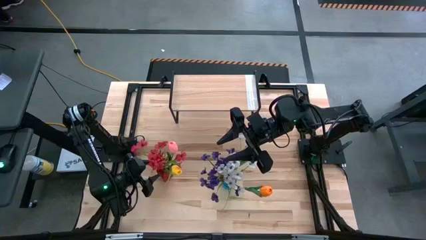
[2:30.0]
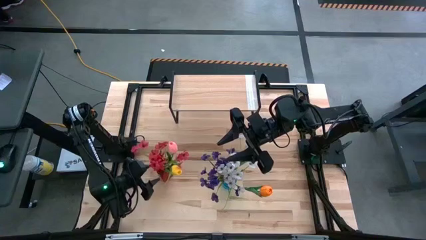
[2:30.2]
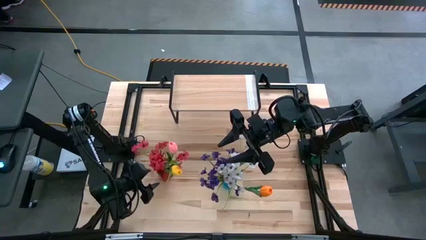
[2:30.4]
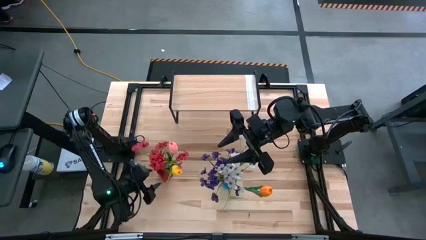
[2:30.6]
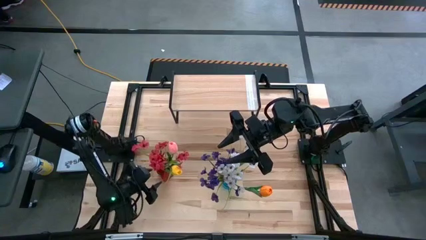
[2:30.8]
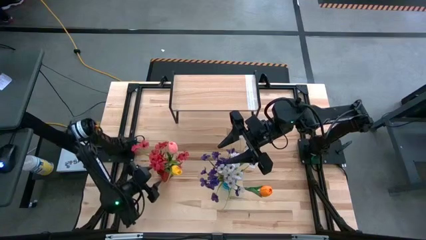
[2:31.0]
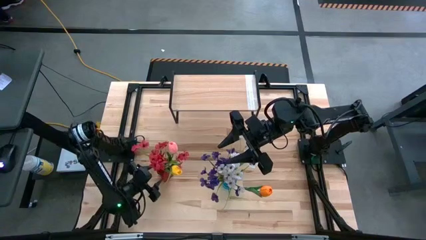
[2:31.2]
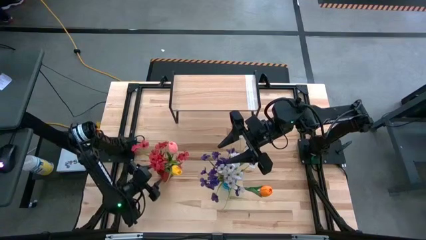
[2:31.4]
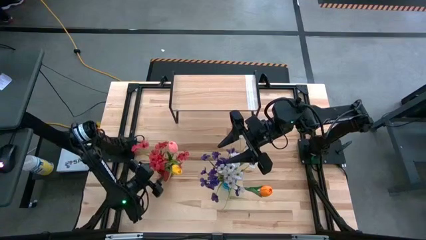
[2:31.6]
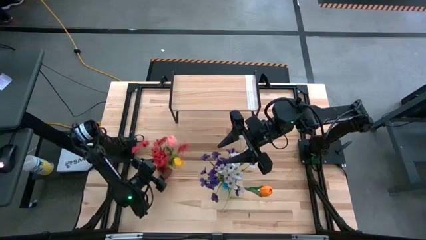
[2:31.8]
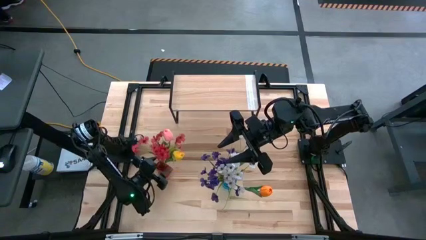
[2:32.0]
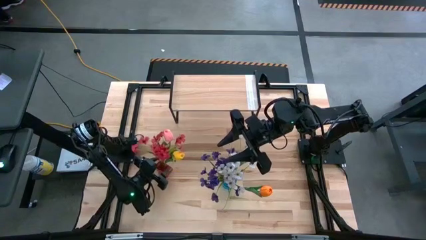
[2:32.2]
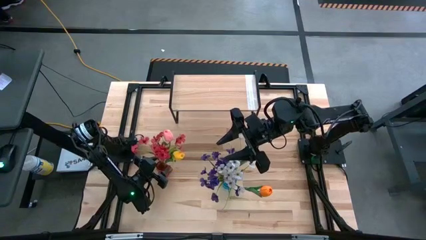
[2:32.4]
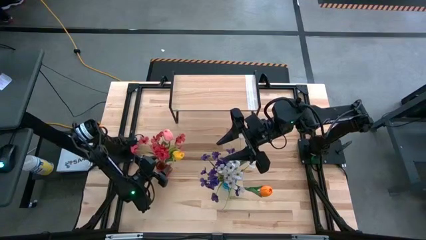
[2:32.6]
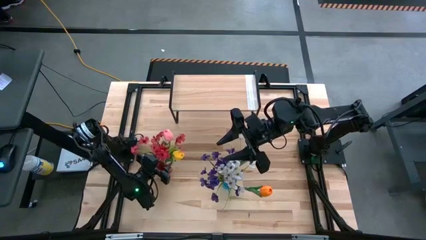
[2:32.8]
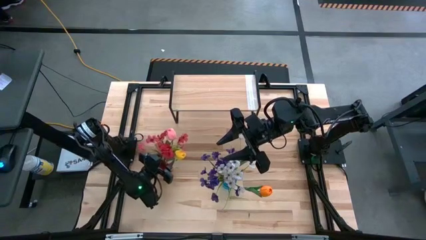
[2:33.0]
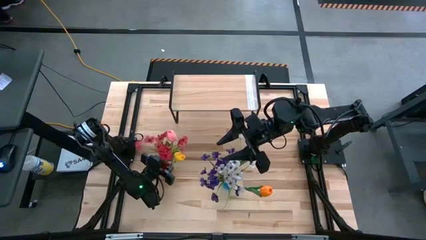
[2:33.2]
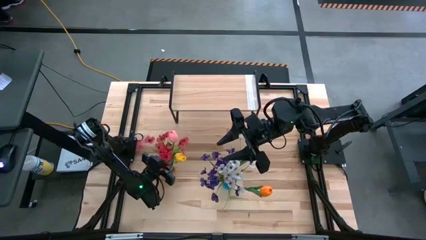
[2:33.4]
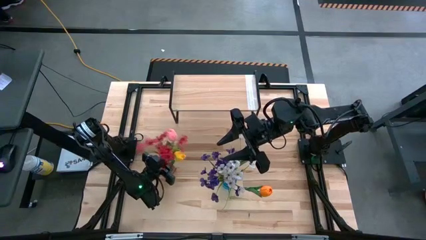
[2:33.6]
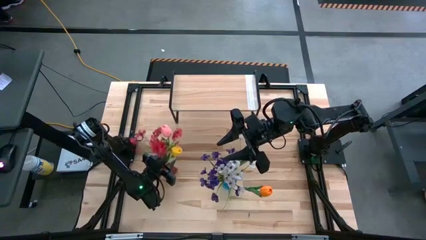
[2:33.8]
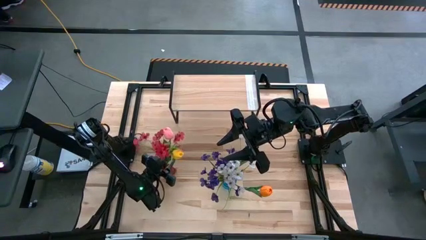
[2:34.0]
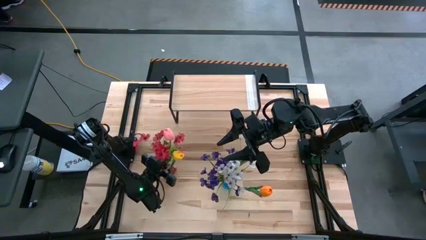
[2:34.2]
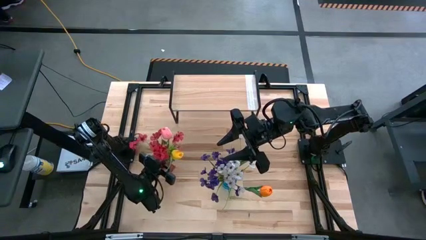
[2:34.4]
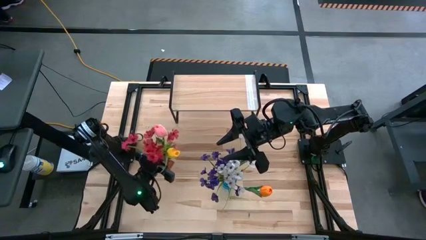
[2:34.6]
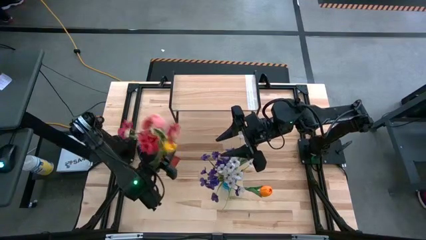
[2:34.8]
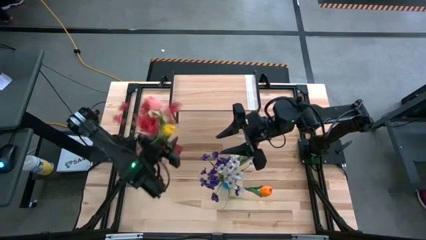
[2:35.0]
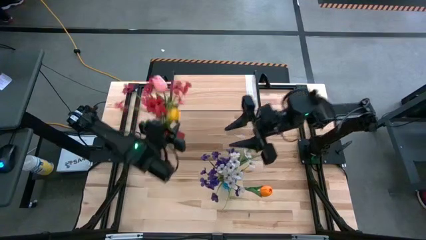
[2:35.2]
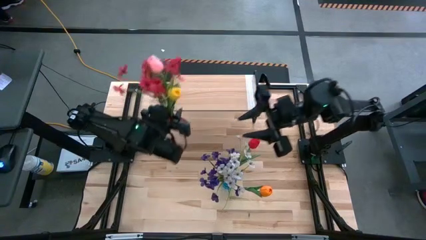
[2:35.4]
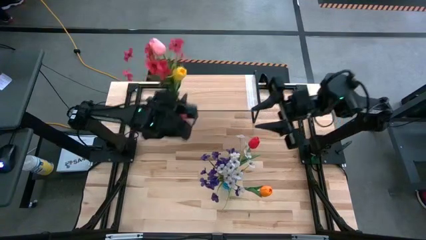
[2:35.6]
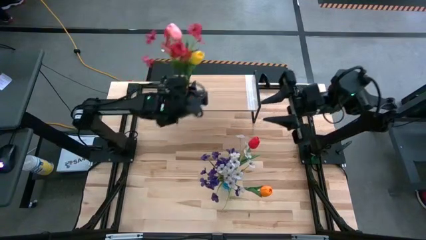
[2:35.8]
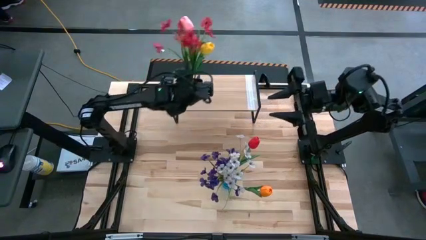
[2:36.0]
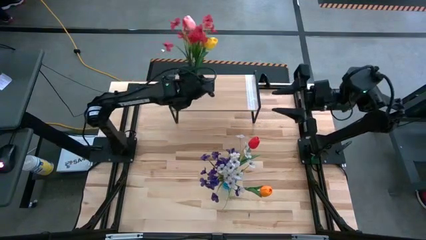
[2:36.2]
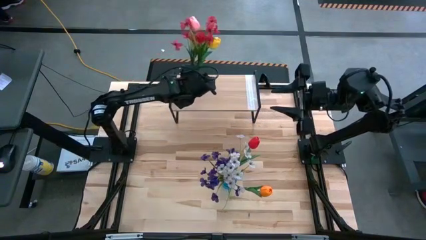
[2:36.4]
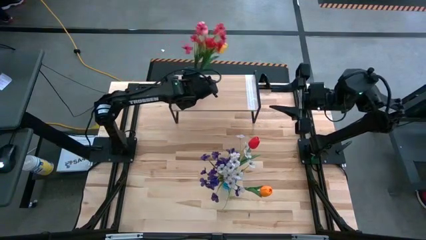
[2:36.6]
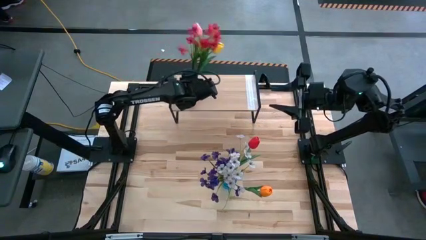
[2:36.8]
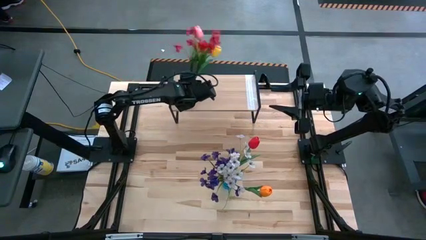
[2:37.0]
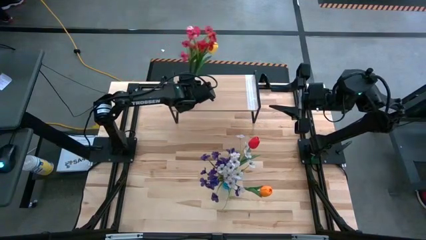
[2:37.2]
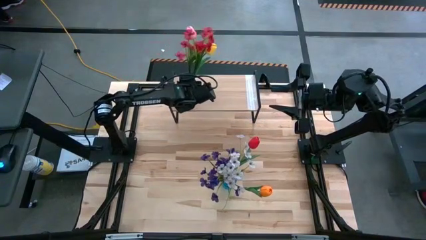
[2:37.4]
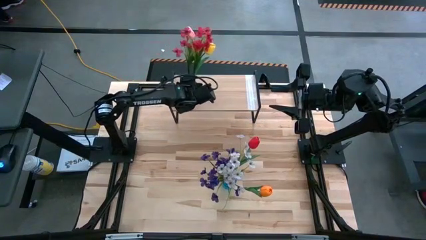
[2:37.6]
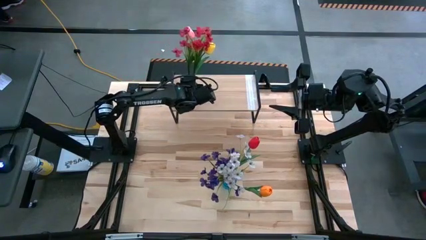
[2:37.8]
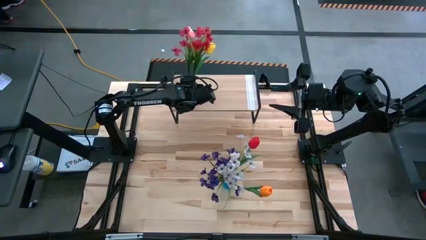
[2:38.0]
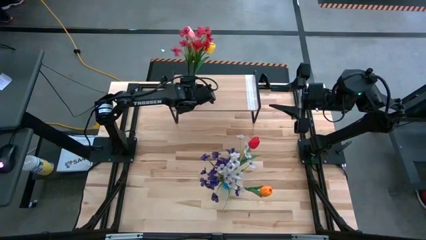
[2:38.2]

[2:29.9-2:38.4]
Task: Pick and place flowers into a vace then onto a shelf
Put the red vase on the shelf

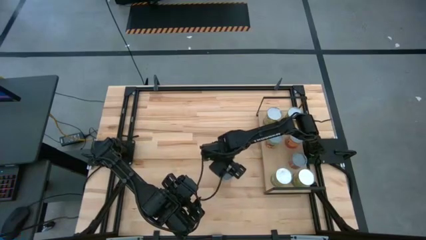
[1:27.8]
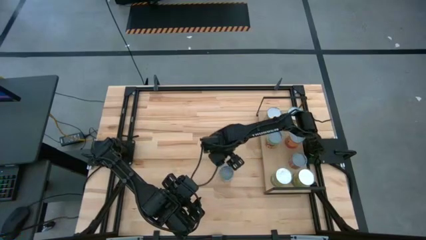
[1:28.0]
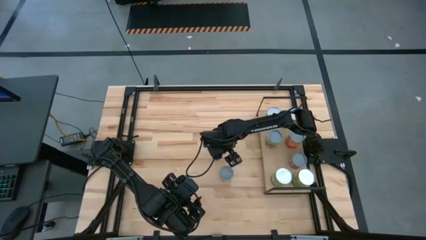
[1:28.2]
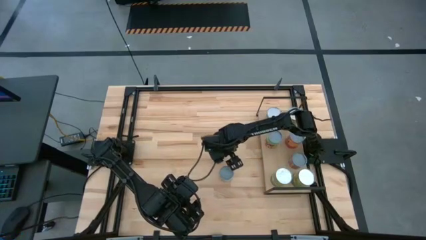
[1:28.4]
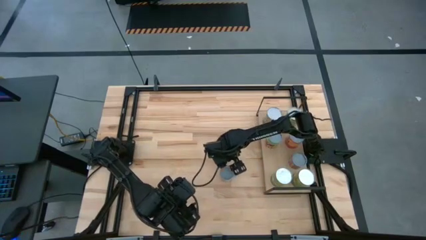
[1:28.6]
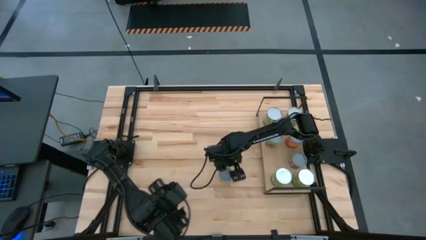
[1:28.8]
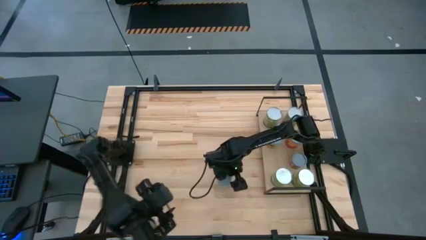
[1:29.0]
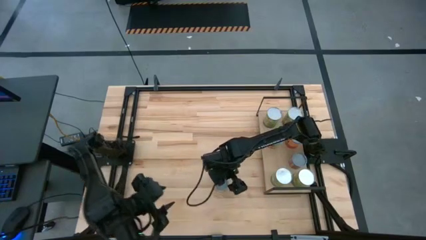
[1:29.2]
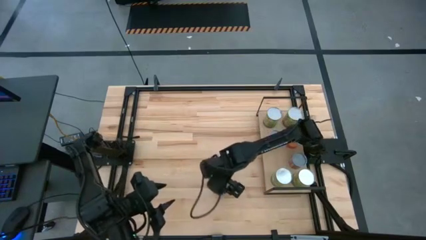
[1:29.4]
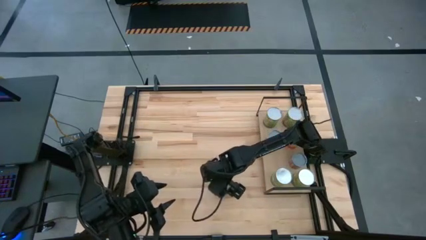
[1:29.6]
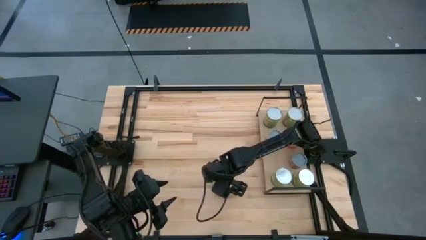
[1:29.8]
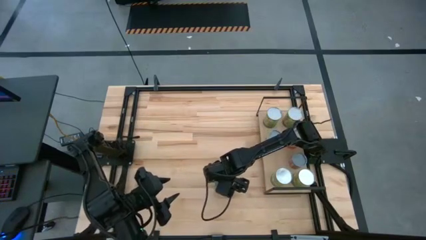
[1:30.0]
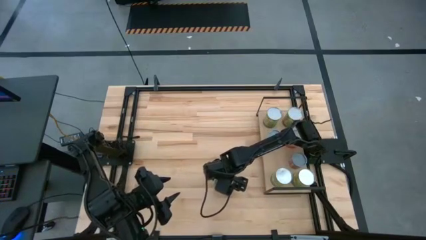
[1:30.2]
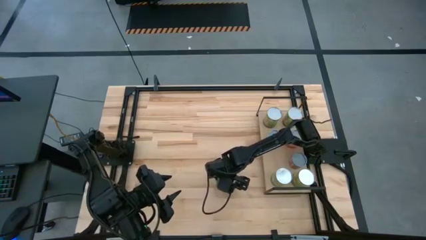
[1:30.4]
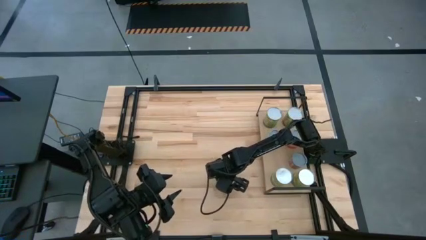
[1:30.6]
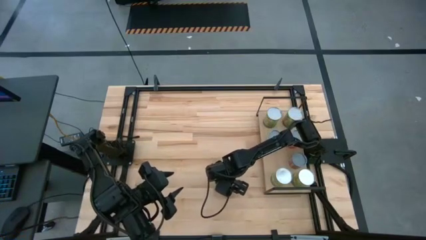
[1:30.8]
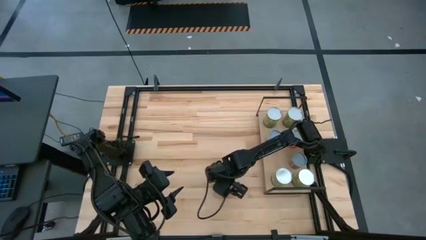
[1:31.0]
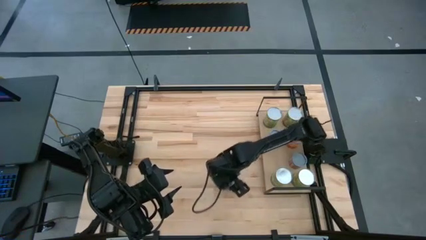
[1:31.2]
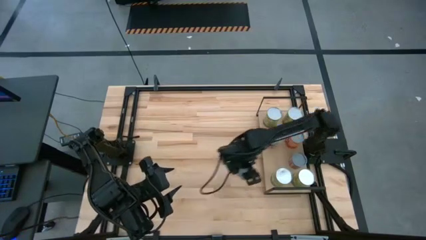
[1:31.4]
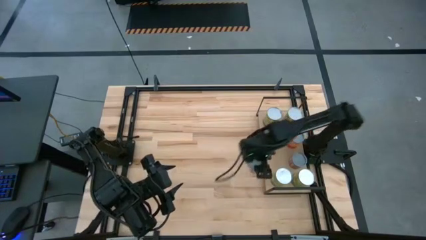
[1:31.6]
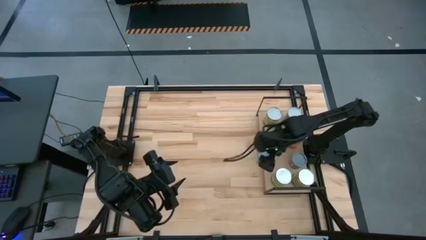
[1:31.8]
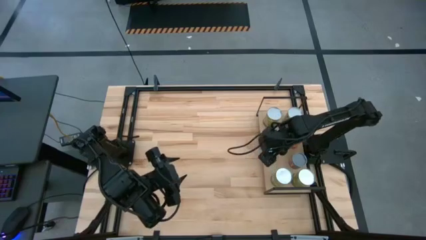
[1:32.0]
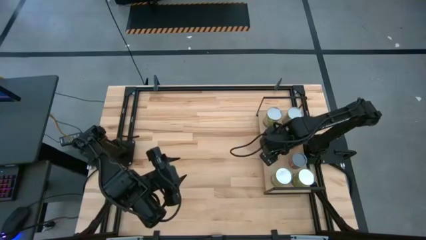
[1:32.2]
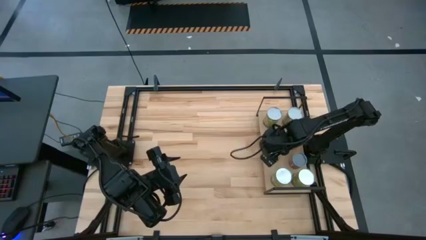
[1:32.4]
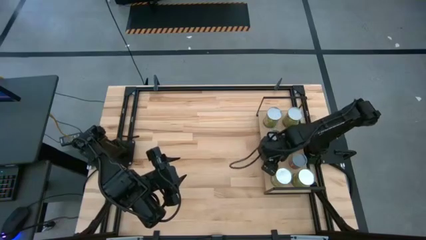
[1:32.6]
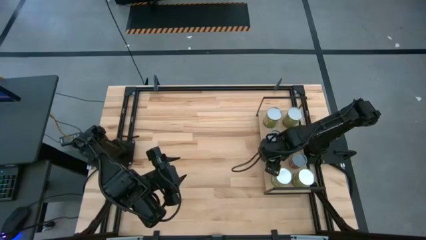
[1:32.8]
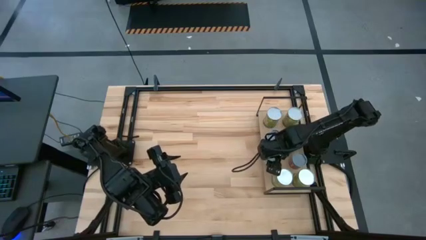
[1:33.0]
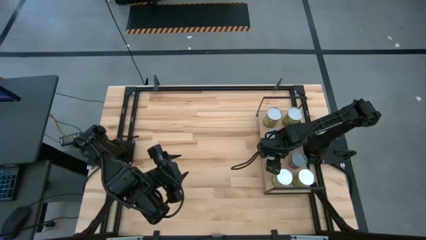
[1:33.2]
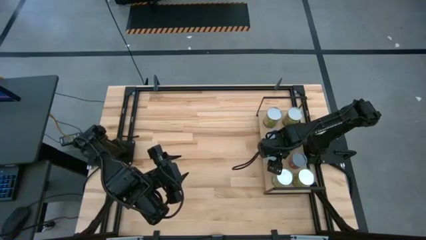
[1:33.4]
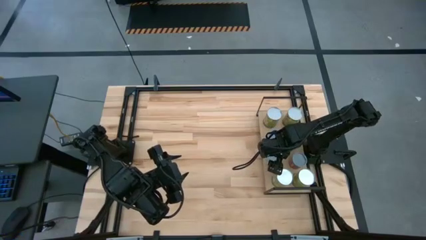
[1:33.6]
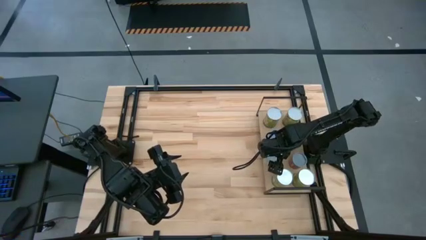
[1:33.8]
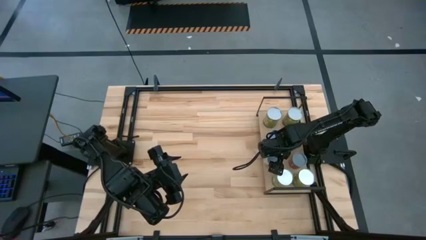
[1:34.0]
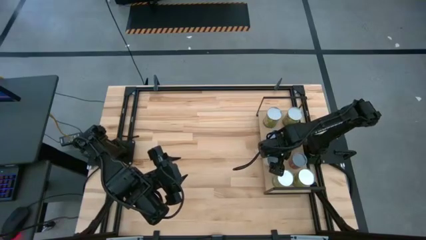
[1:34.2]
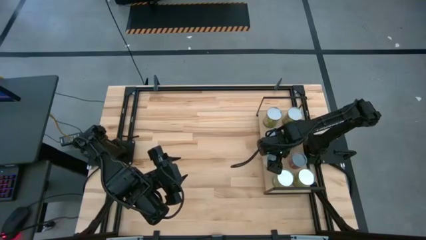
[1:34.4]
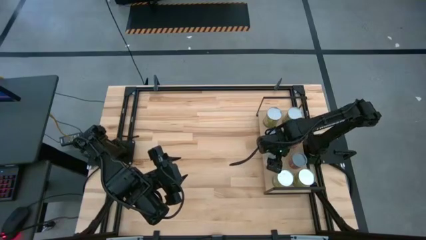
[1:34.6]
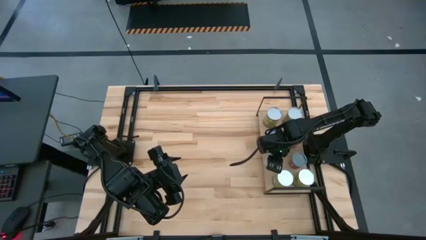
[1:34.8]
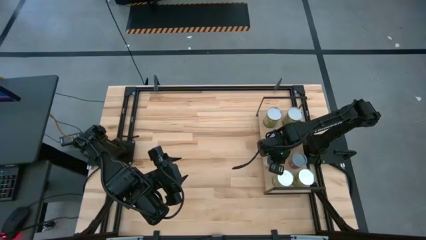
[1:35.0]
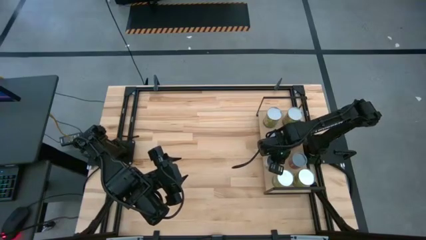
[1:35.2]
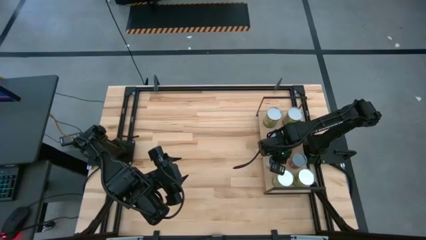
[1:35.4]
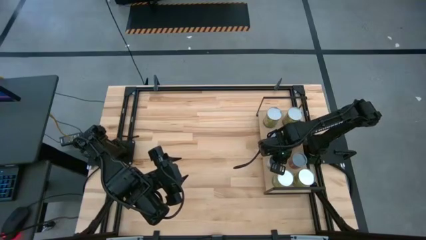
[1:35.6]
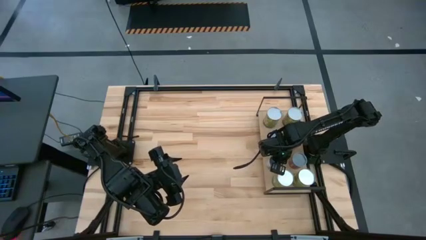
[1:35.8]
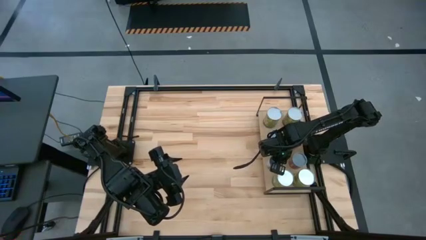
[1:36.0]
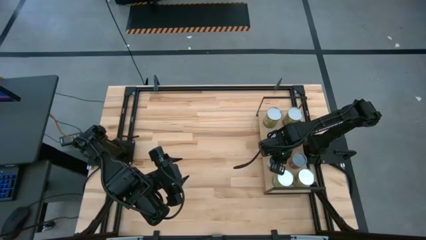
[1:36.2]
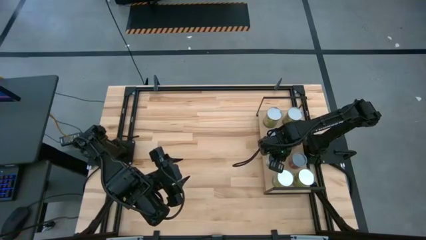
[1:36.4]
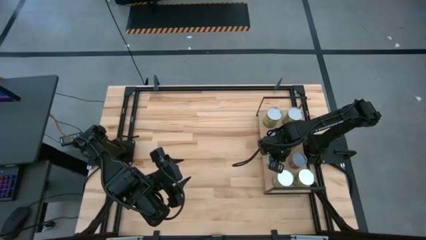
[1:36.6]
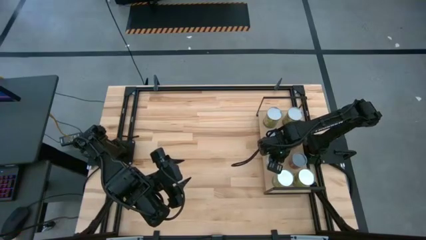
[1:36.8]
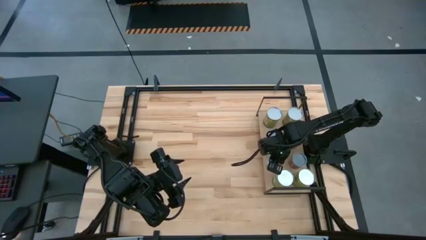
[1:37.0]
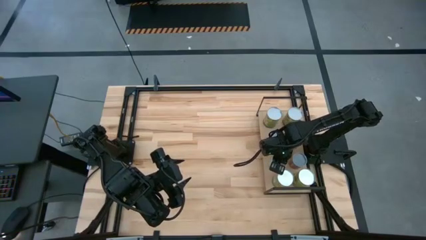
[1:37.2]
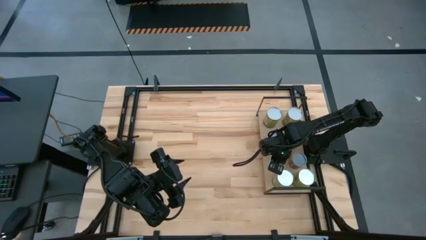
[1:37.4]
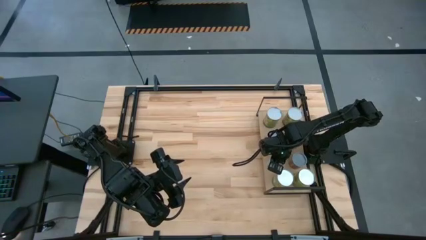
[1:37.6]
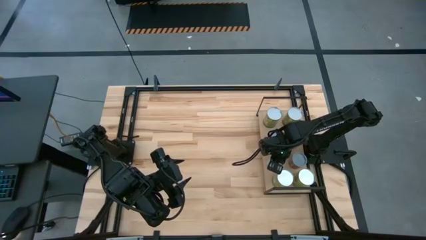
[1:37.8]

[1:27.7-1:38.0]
Task: Pick and place cans onto a shelf
Put the small canned oranges on the shelf
